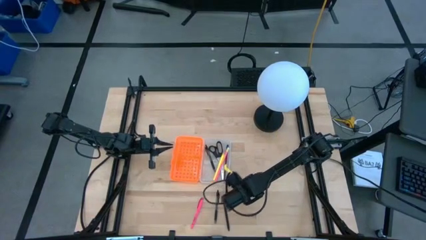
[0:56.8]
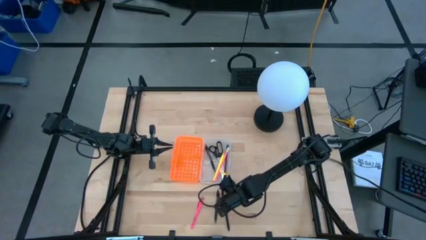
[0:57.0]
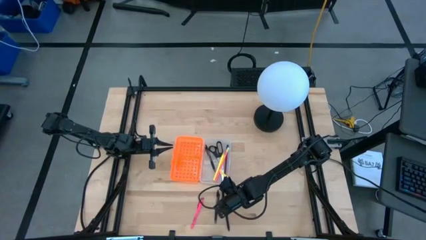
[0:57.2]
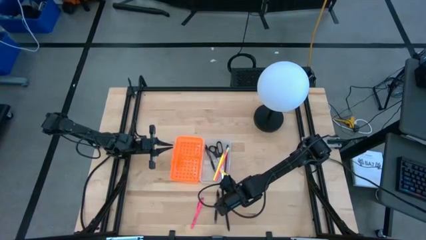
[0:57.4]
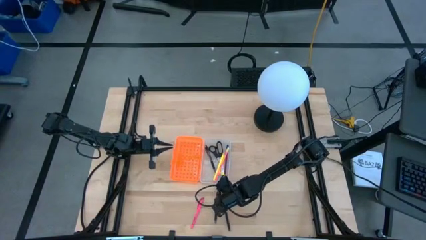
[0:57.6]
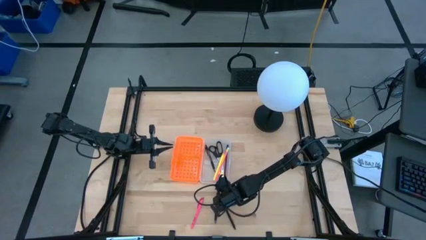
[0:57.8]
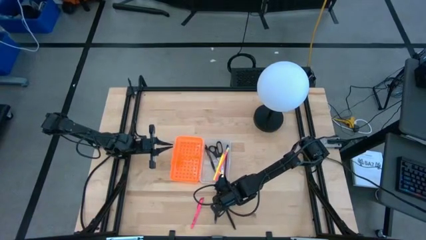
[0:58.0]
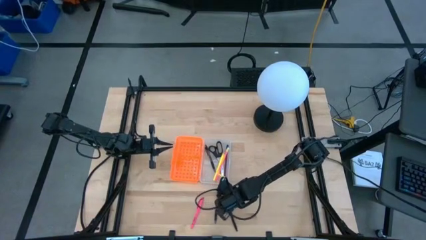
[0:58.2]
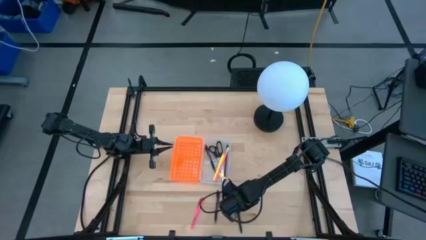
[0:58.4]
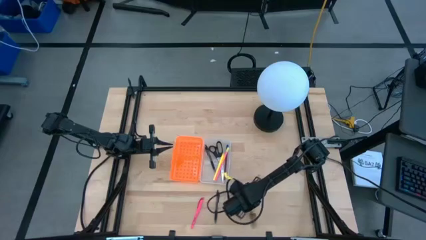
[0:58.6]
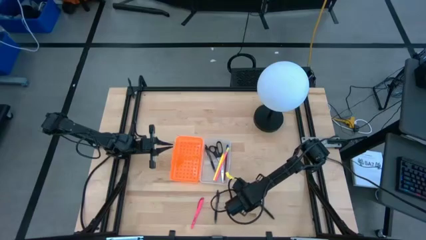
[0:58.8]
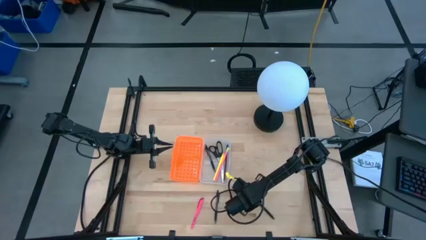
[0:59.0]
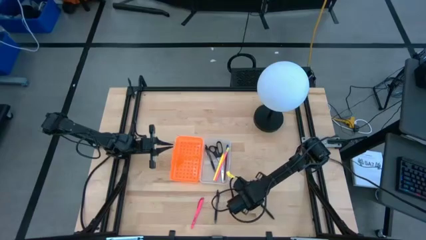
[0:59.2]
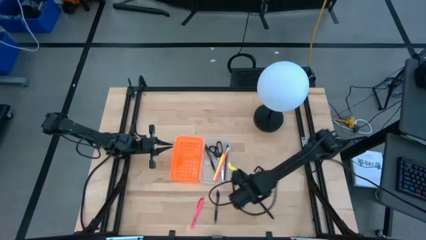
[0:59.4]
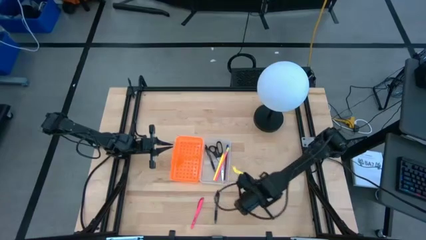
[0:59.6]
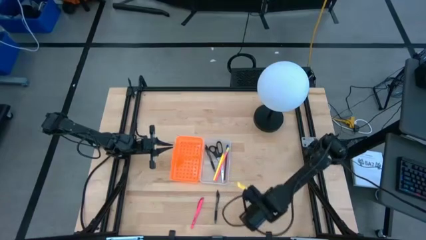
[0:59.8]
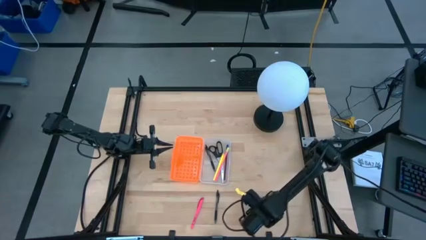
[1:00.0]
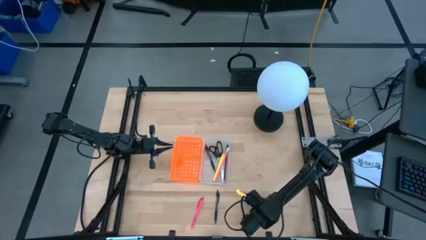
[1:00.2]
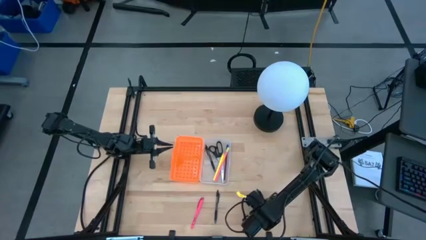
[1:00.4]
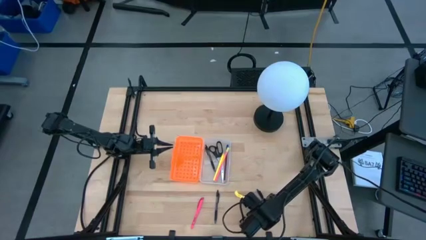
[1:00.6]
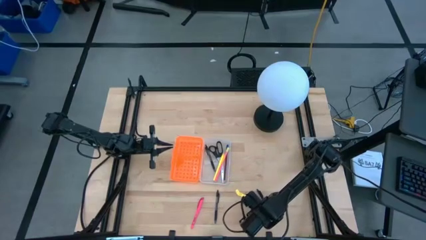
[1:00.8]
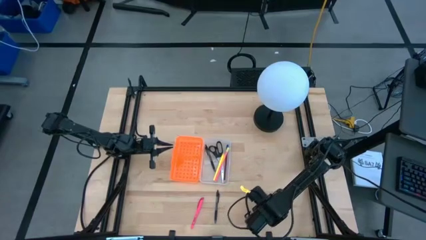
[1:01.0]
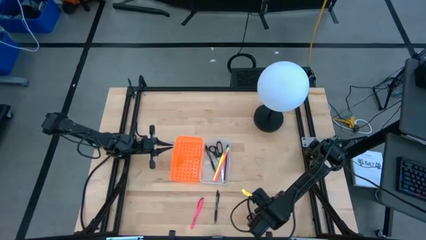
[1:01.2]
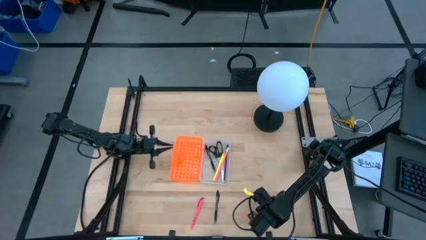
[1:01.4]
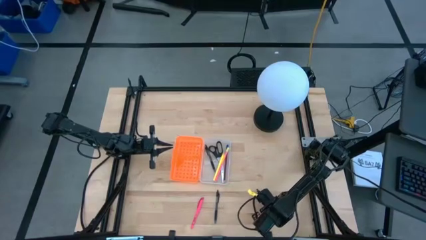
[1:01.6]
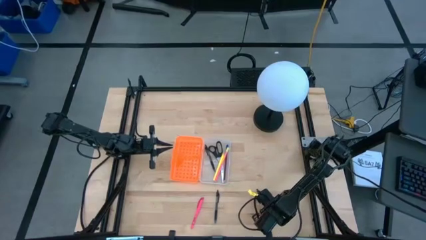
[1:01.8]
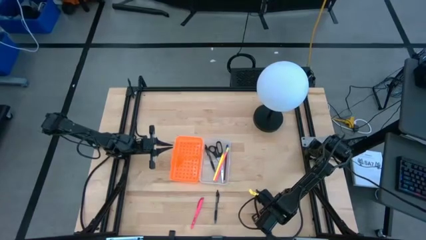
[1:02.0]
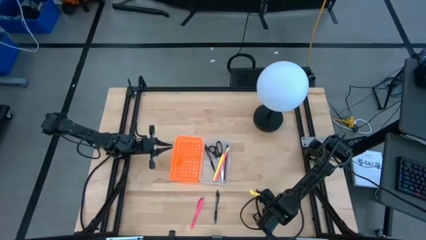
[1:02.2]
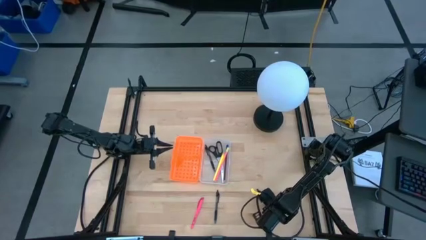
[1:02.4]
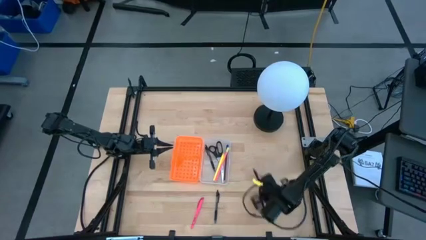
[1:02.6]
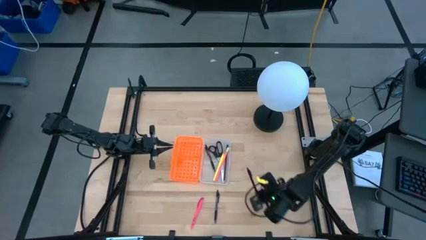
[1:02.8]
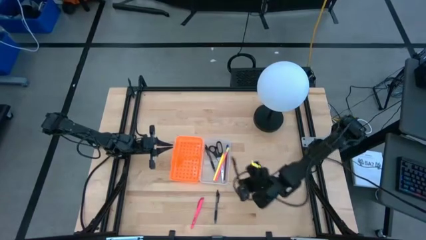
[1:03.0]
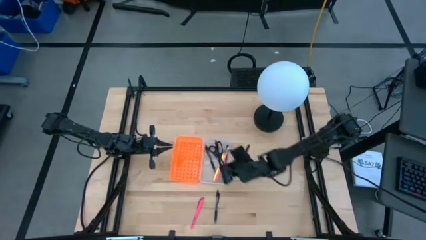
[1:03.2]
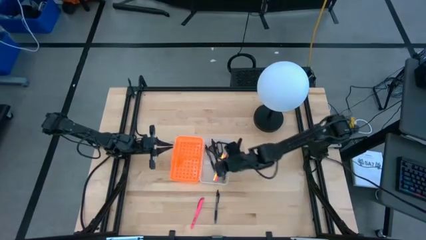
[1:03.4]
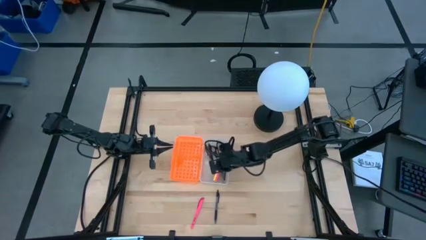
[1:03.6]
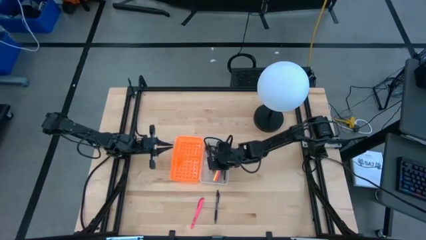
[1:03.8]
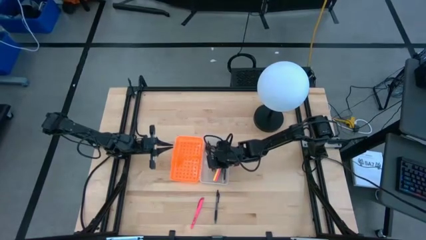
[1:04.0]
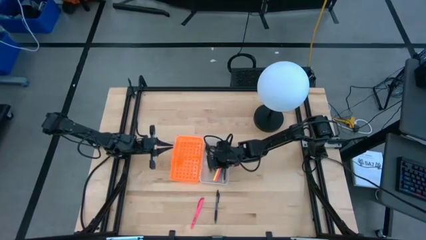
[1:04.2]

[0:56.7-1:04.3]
Task: Pick & place school supplies into a supply box
Put the black pen into the supply box

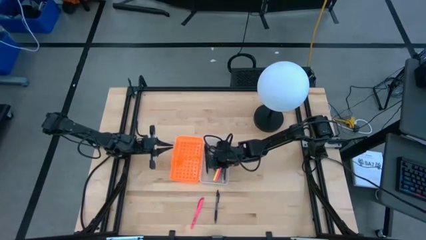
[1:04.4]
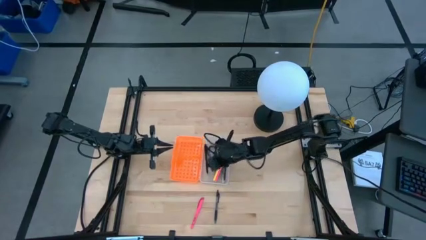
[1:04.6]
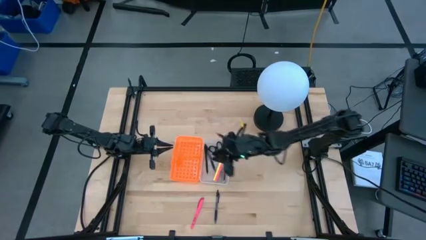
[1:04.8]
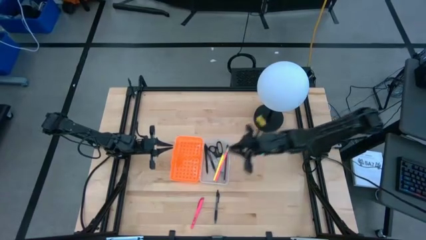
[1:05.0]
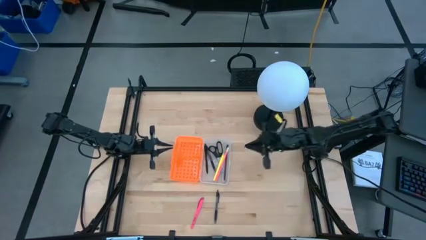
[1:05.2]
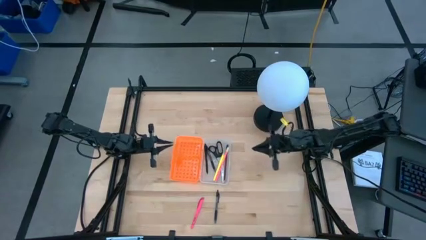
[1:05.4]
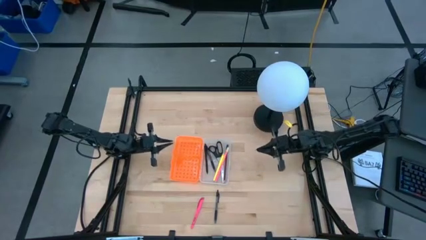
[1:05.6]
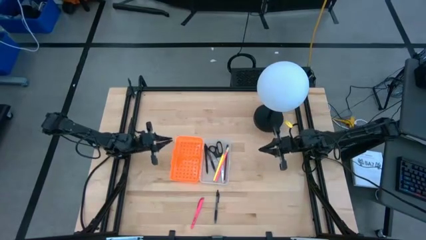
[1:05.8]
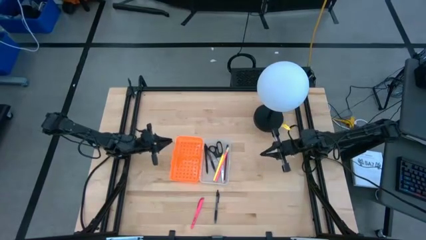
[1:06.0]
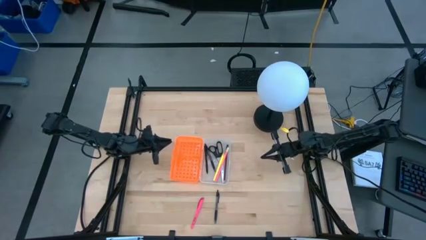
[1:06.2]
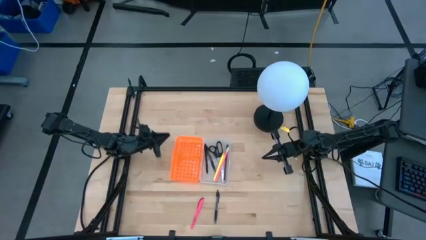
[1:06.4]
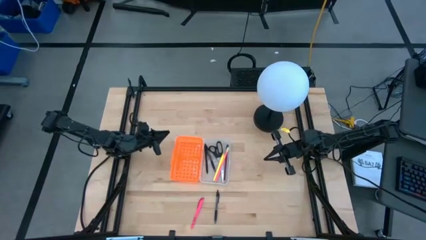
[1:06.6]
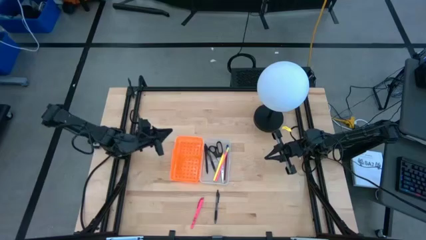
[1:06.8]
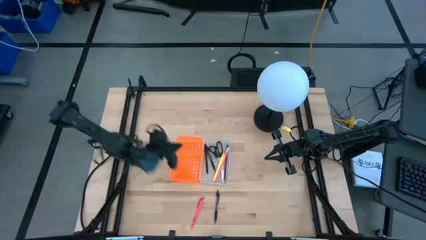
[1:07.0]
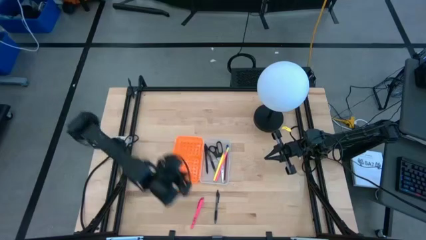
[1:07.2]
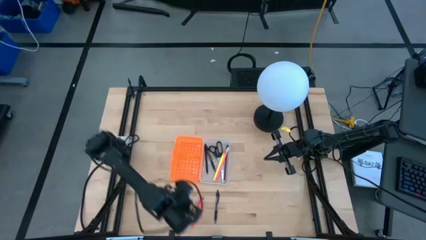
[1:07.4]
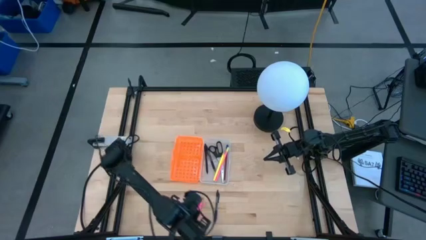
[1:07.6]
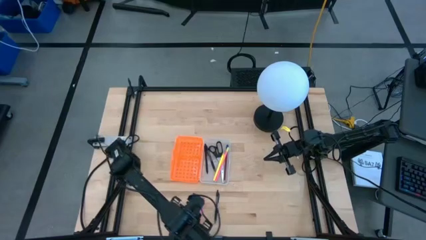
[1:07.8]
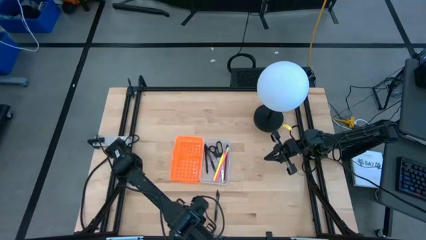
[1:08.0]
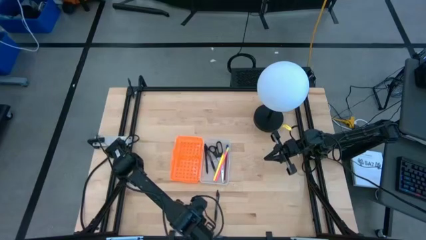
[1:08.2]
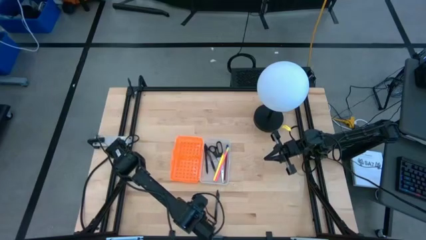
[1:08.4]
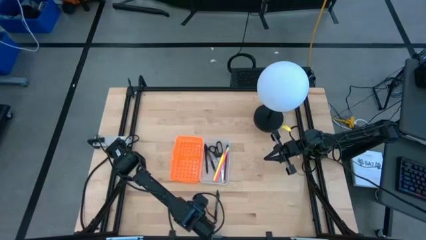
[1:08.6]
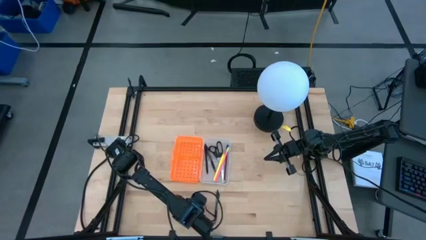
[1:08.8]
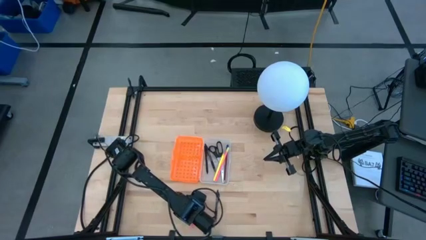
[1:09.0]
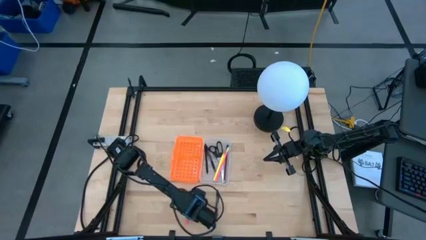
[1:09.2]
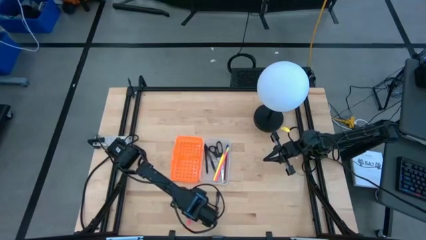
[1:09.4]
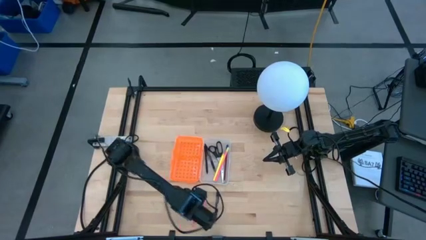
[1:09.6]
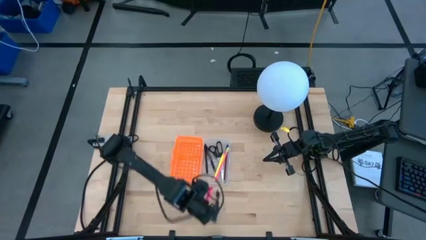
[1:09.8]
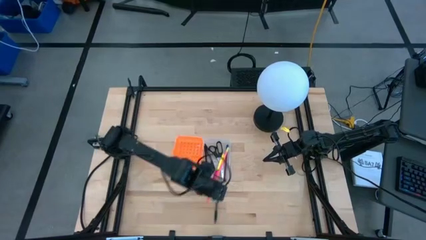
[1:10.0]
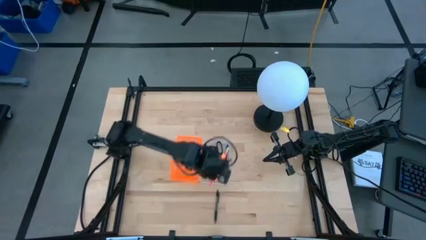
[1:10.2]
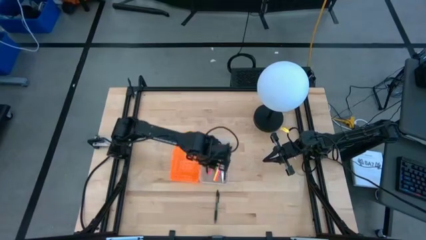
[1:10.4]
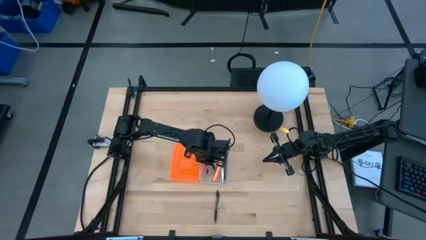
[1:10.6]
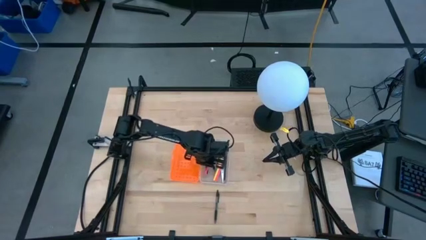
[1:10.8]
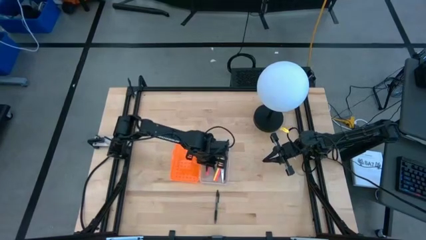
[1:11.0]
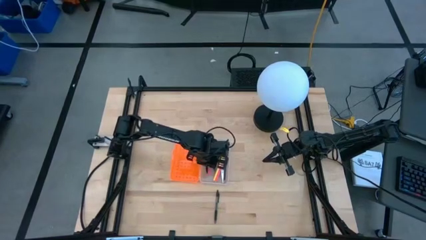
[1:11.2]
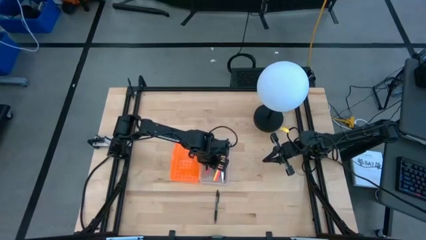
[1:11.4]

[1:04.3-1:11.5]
Put the pink pen into the supply box

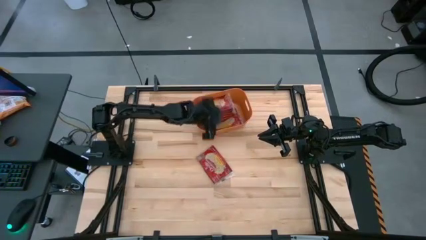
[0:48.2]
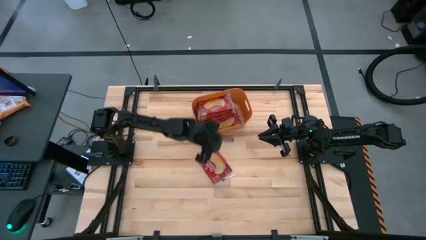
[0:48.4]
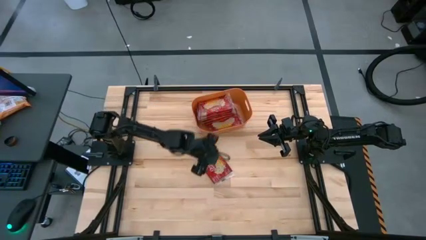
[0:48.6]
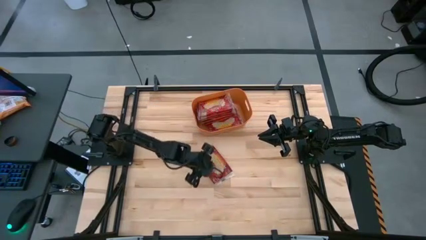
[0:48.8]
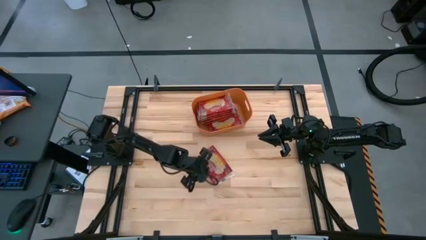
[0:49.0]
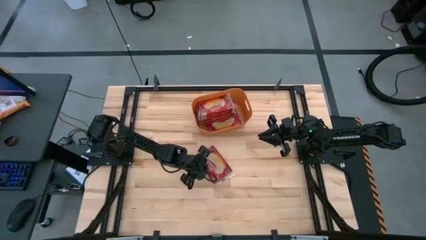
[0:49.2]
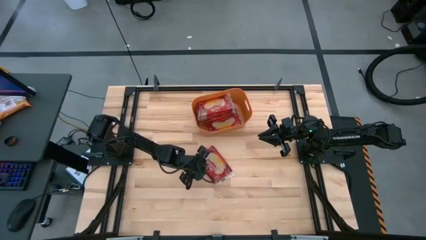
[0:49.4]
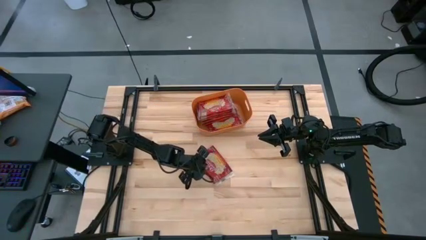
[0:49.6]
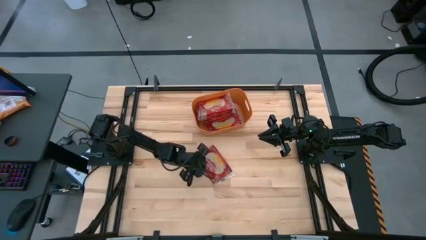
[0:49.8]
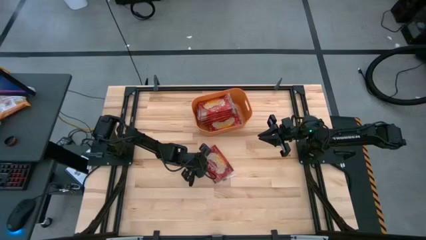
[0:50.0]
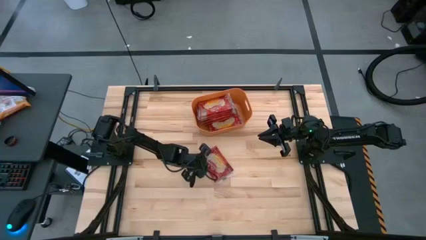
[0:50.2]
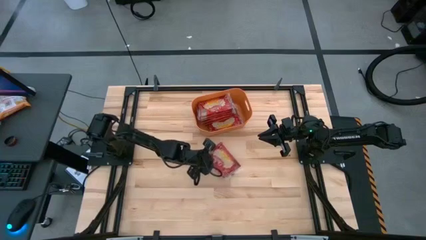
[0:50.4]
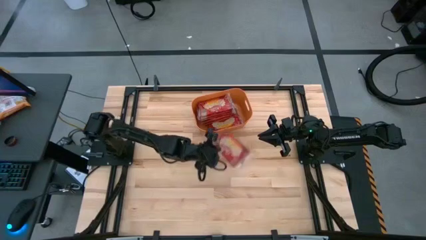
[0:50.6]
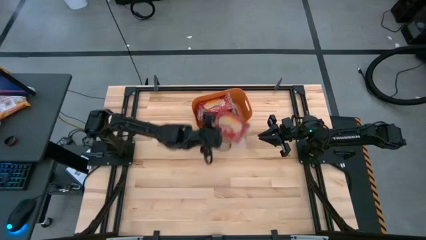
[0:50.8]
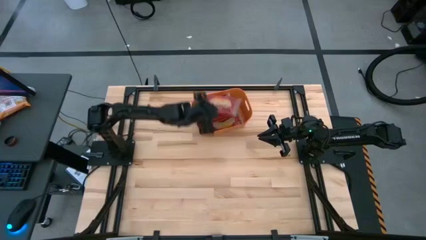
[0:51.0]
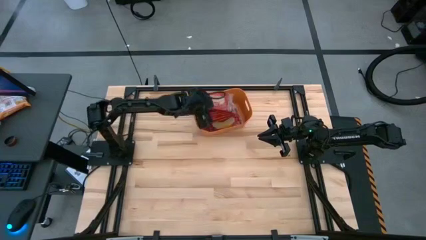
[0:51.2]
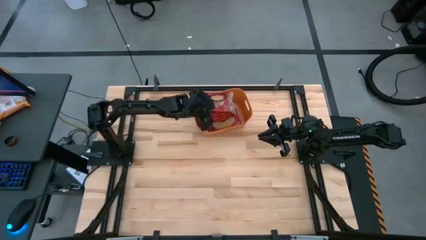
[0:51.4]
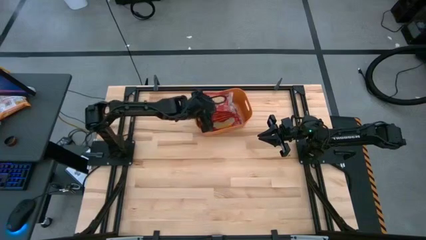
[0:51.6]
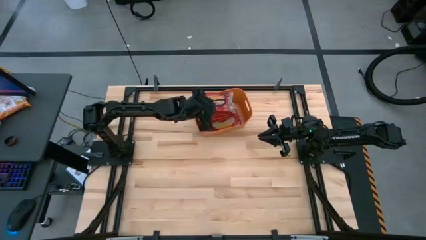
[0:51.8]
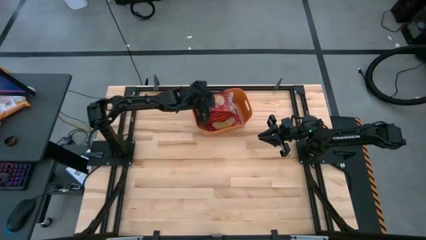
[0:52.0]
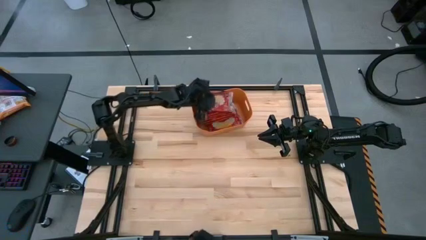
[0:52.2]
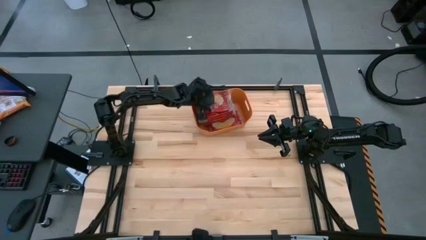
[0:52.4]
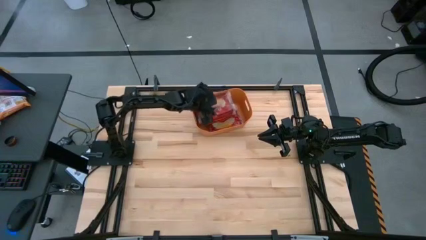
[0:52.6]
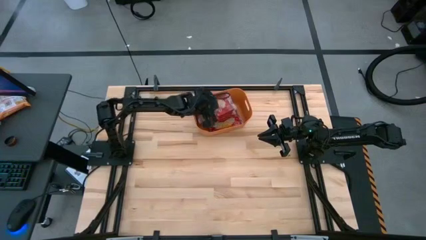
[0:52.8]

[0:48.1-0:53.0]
Task: Sort popcorn bags into baskets
Put the red popcorn bag into the orange bin
